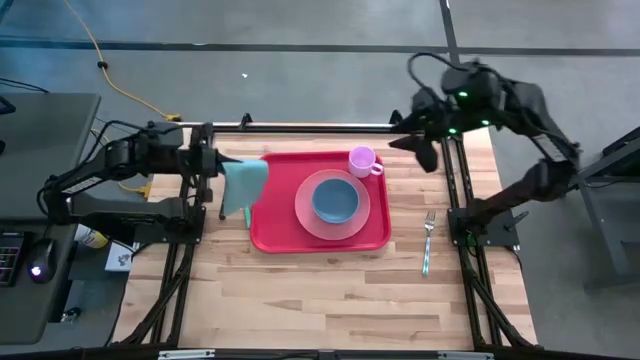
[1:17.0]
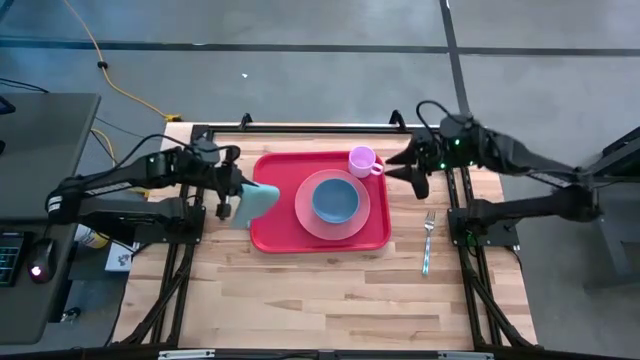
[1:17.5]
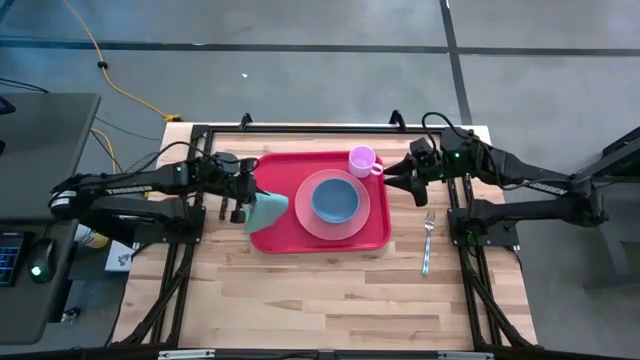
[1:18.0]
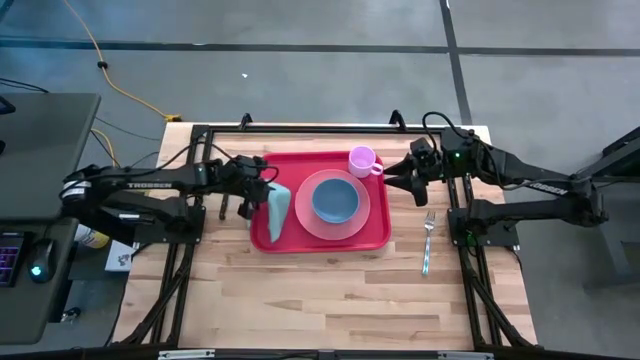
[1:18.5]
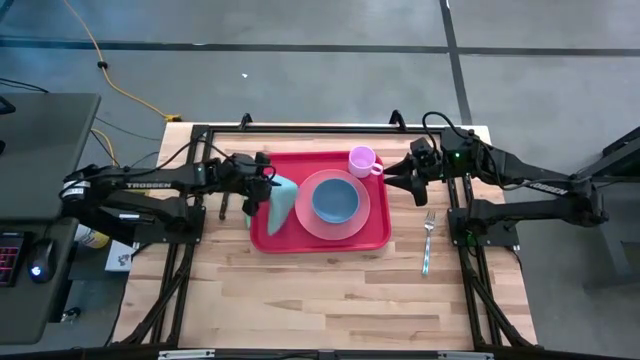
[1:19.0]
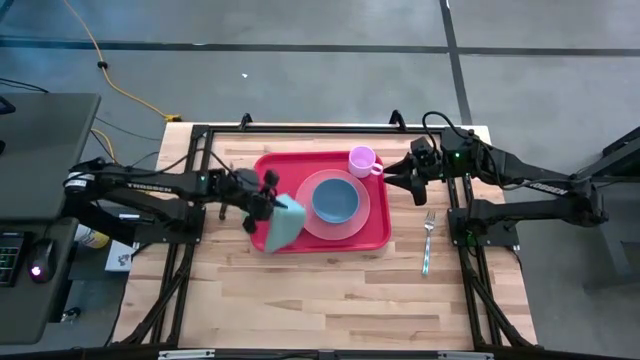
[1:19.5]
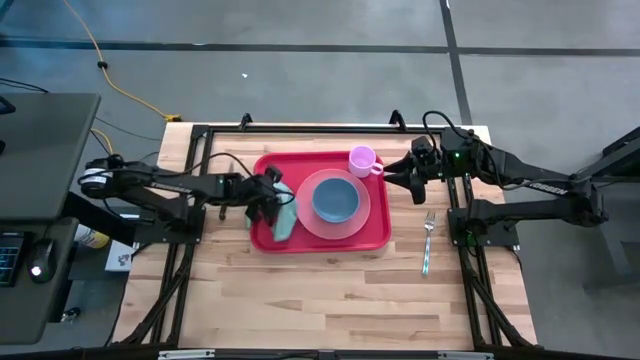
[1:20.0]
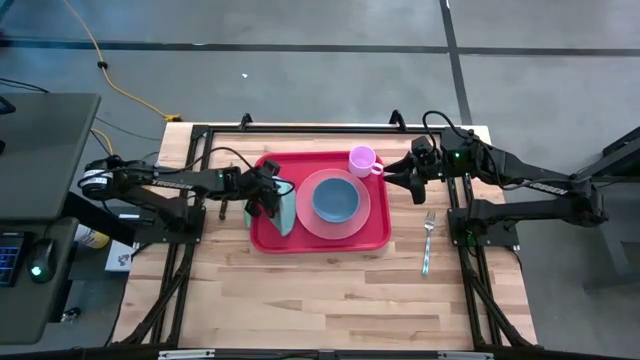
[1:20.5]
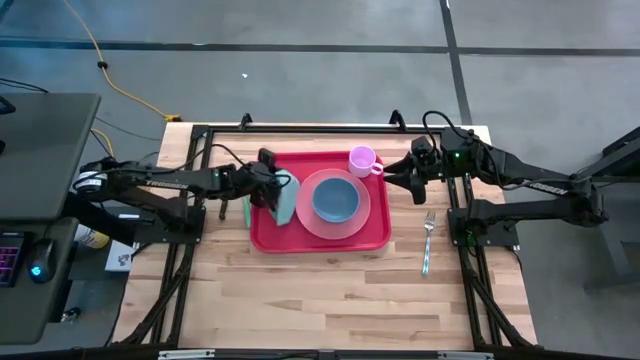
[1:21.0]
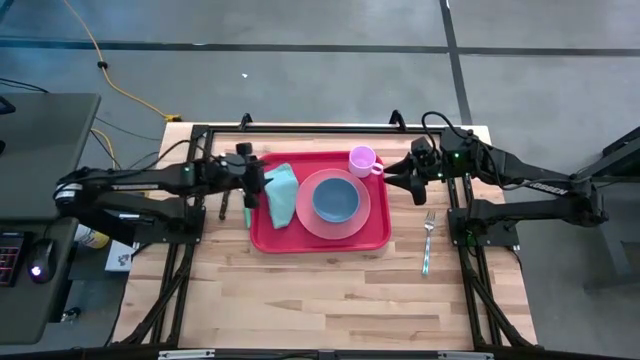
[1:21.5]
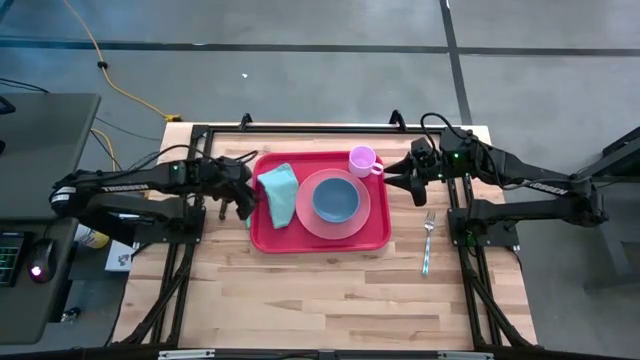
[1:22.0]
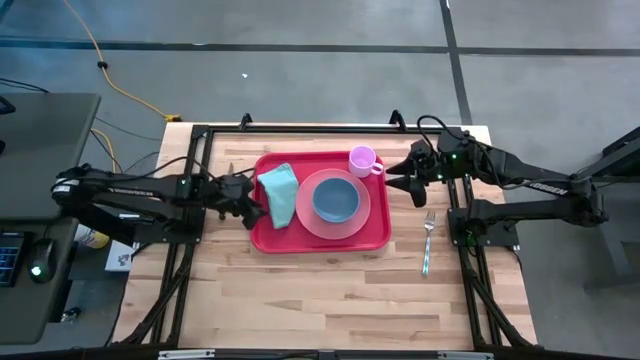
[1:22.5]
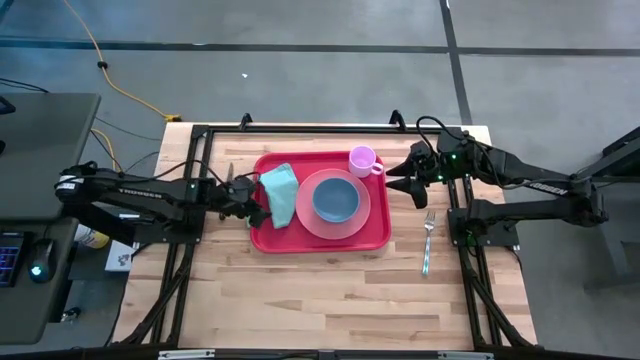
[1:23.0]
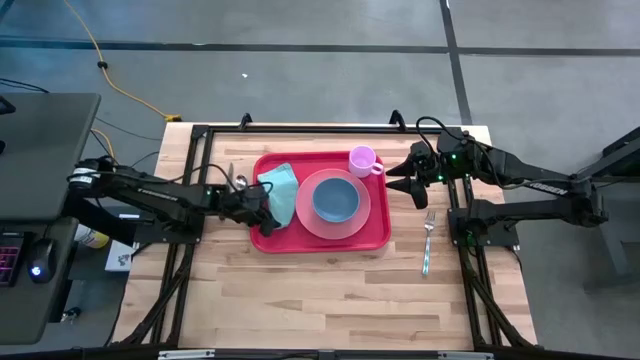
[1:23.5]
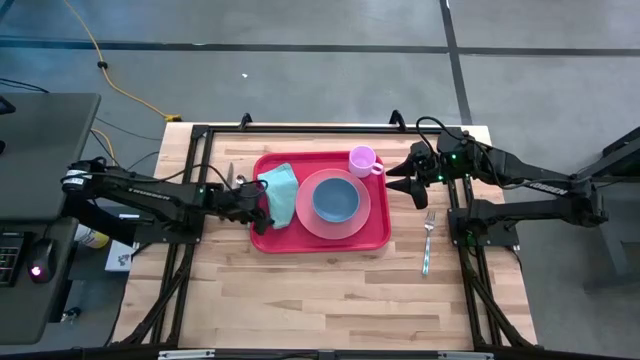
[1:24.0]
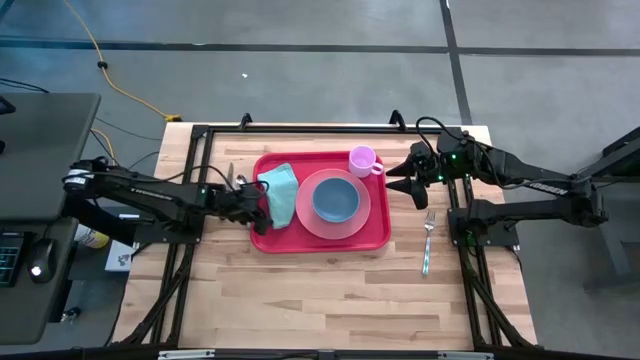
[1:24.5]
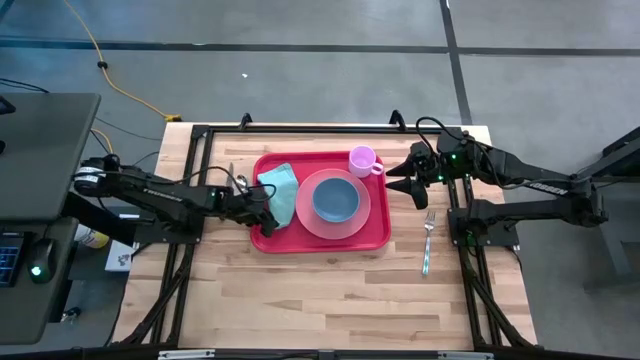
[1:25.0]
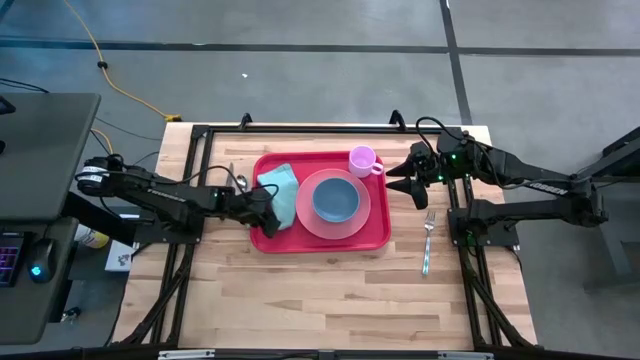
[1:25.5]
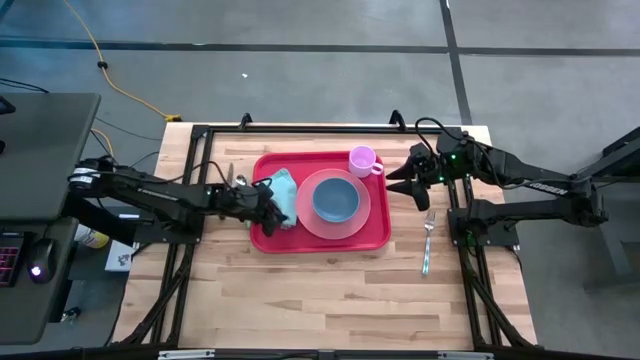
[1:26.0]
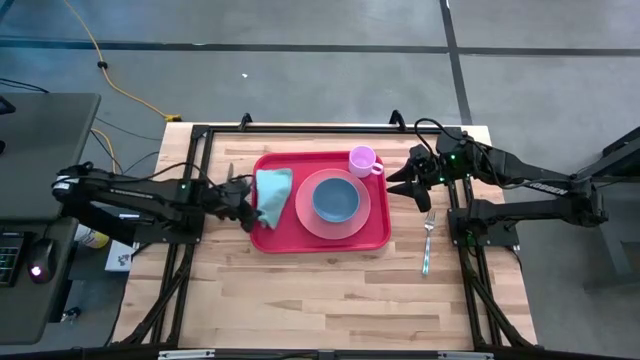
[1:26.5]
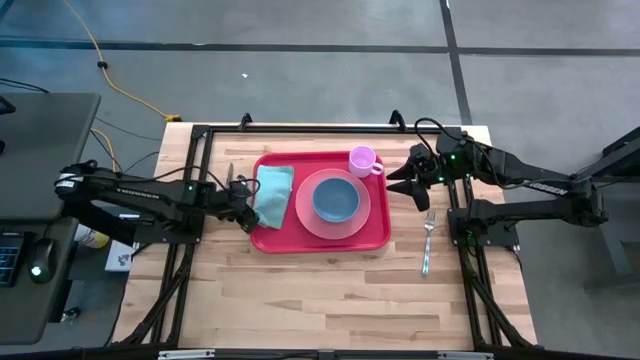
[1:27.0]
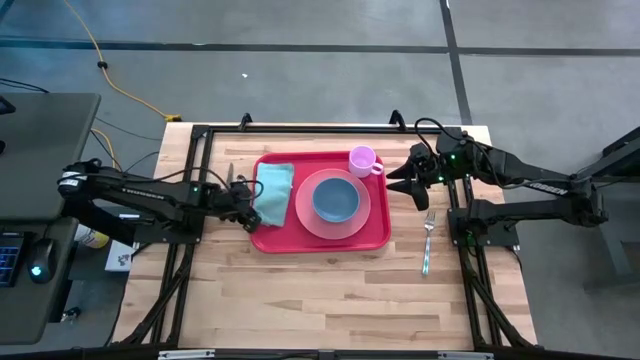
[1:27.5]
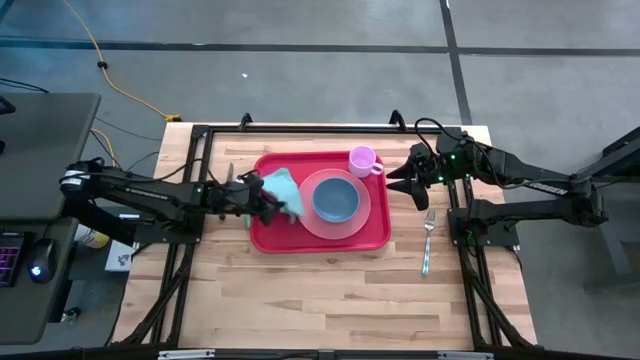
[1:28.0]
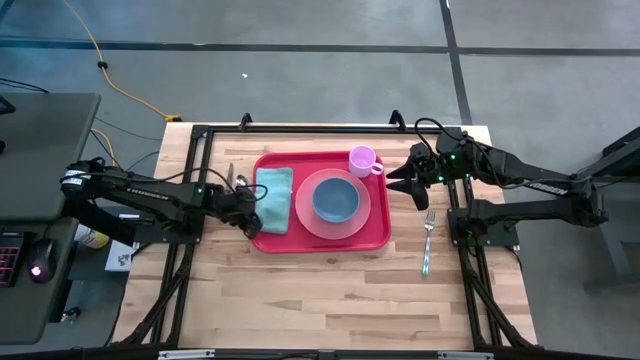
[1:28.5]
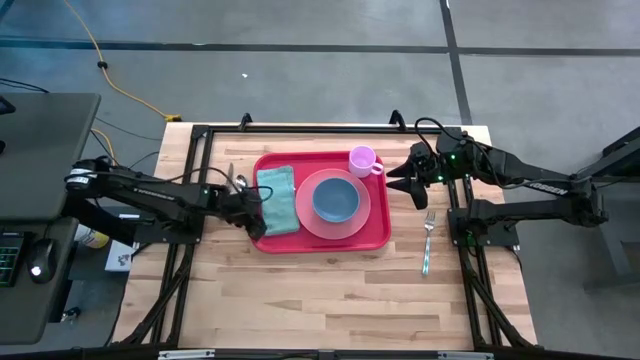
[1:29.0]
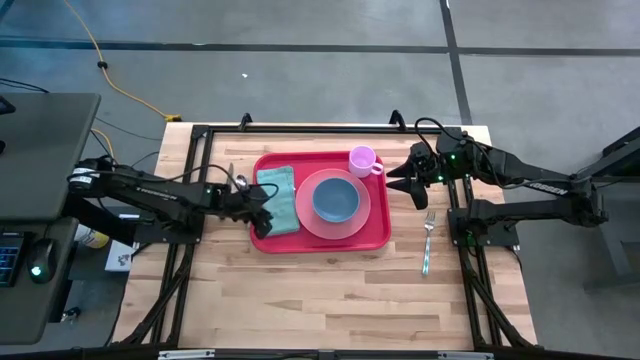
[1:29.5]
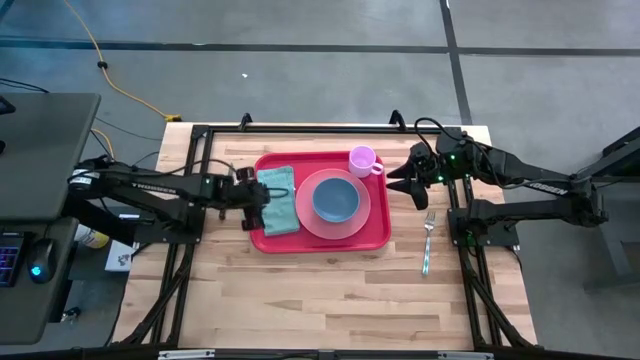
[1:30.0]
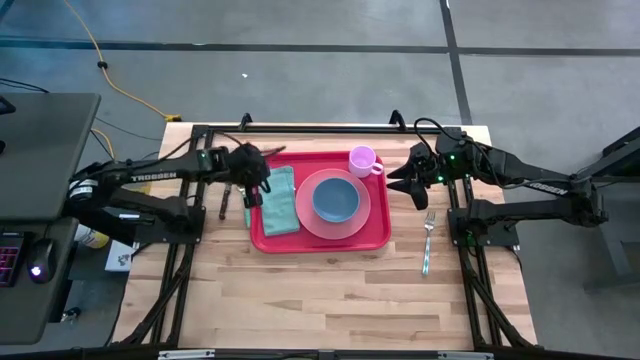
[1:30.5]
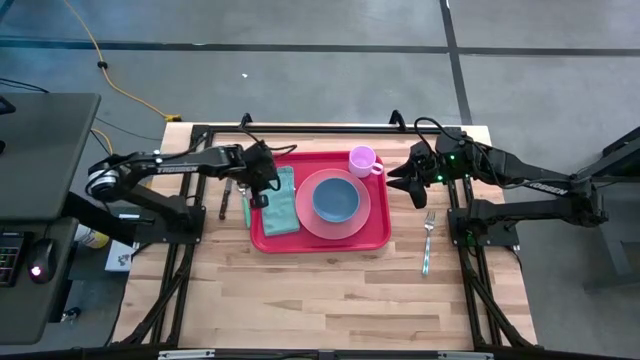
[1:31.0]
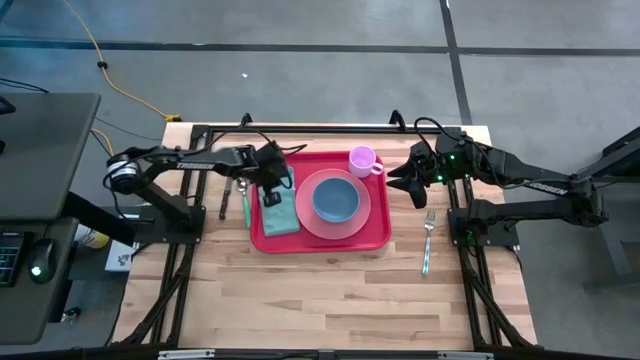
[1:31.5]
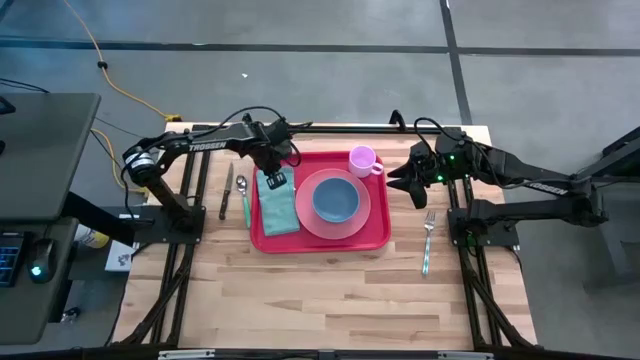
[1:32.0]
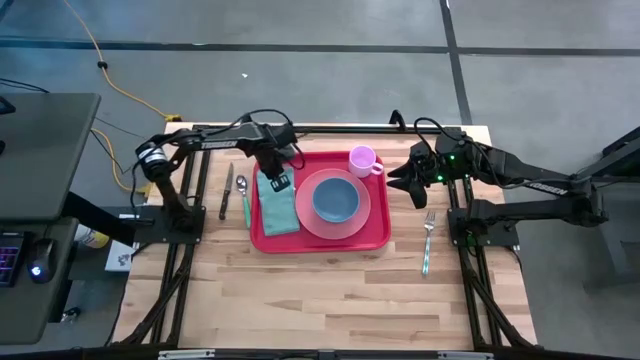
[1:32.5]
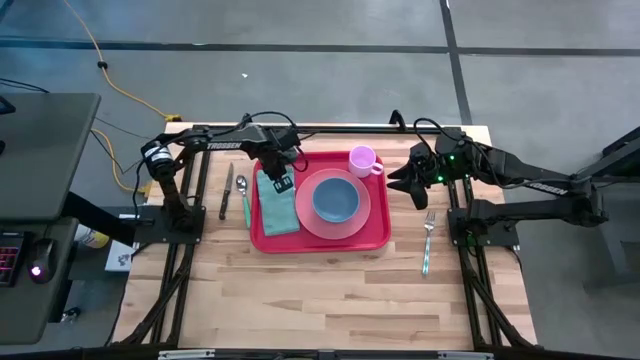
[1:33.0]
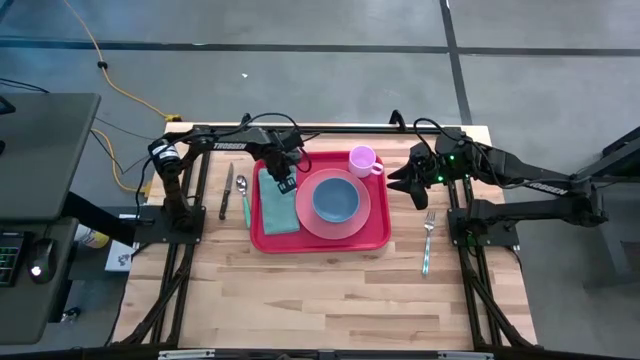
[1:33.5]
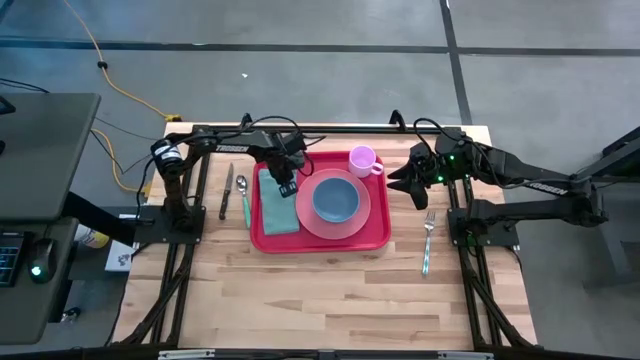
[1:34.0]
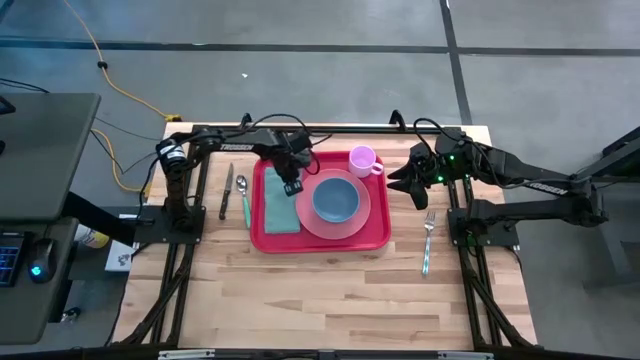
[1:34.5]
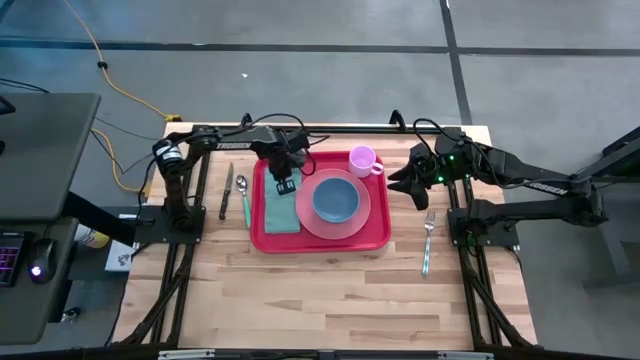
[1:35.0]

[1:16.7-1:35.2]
Task: Set up tray
Put the blue towel on the tray

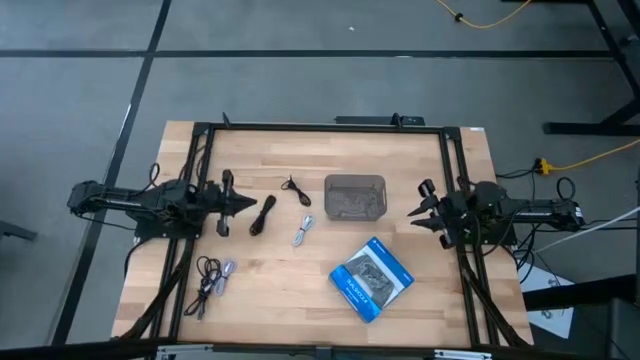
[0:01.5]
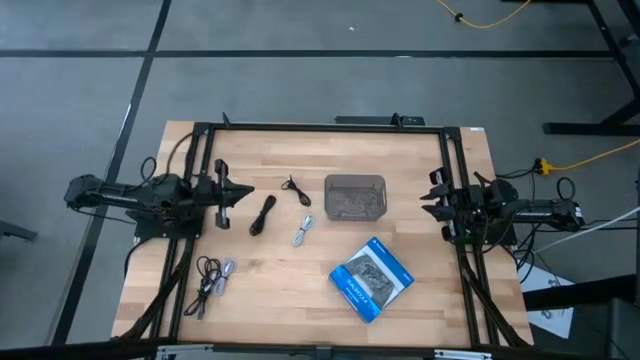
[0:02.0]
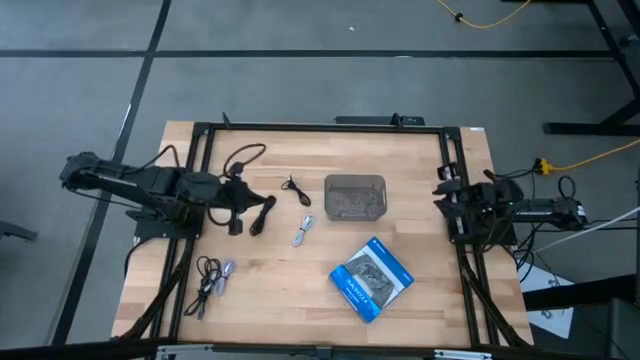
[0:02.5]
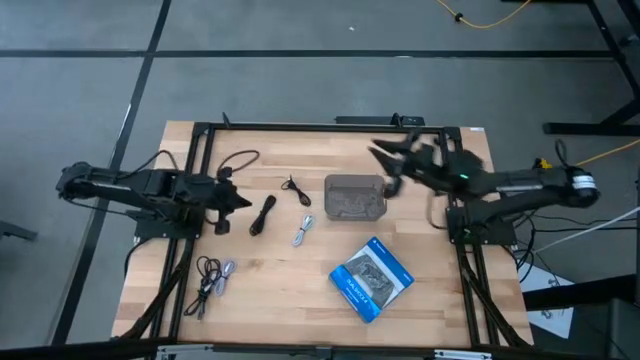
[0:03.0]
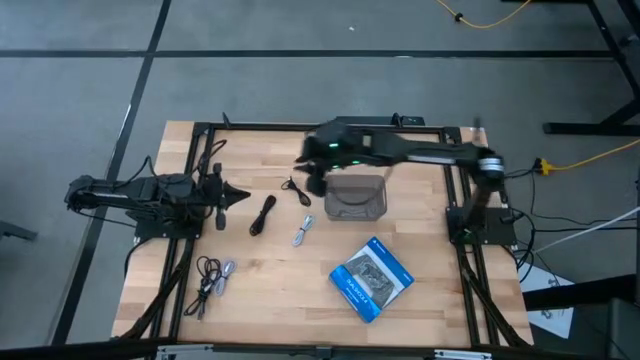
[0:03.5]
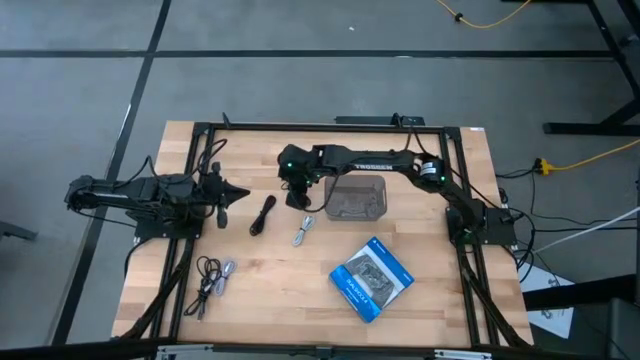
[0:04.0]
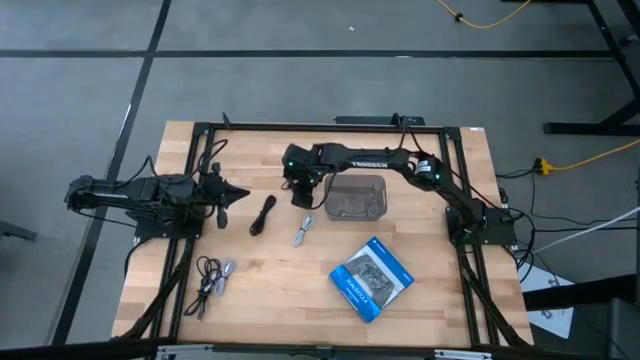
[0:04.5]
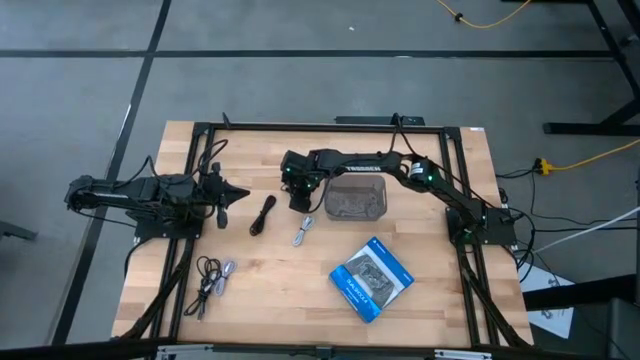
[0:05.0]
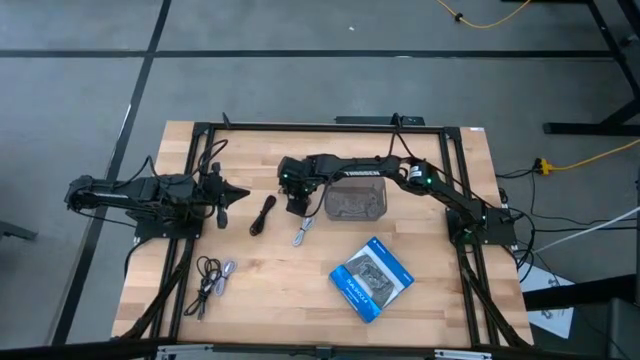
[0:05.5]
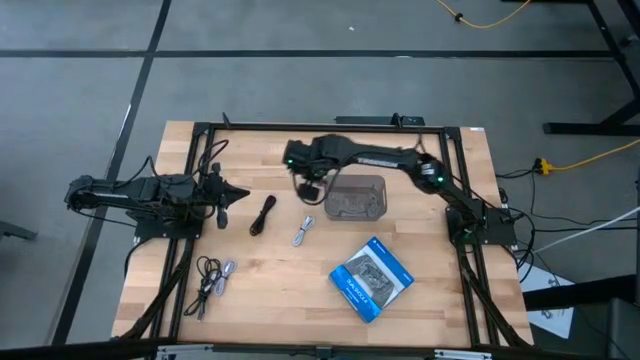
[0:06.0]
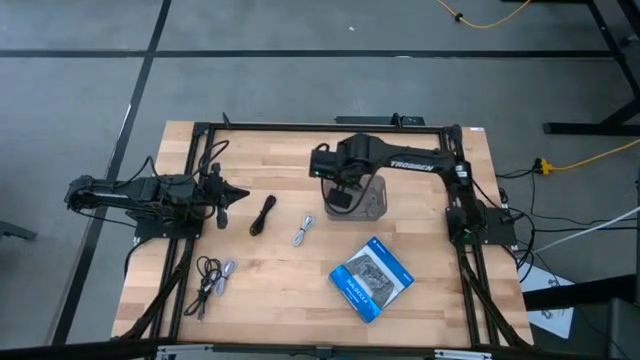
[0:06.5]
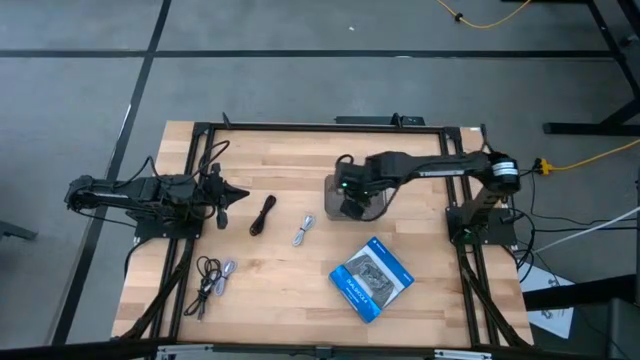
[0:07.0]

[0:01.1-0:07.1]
Task: Pick and place USB-C Cables
Put the top black charger cable into the gray bin
